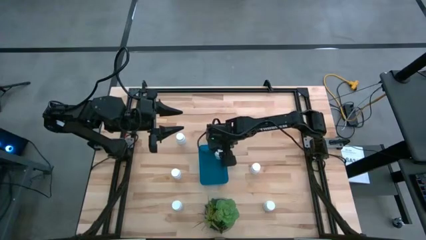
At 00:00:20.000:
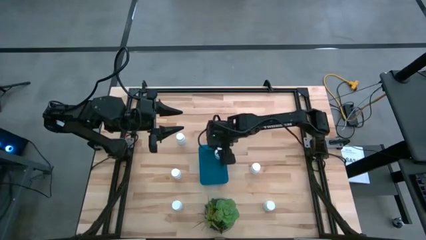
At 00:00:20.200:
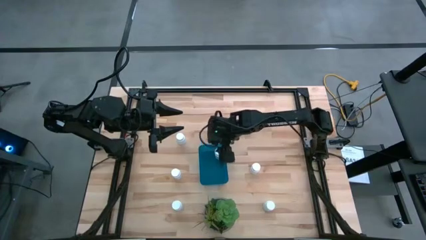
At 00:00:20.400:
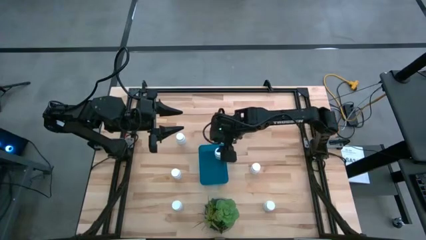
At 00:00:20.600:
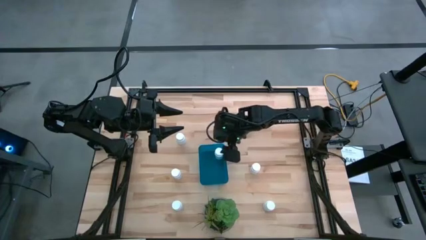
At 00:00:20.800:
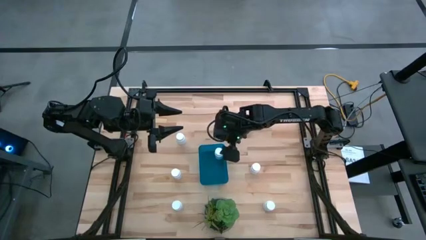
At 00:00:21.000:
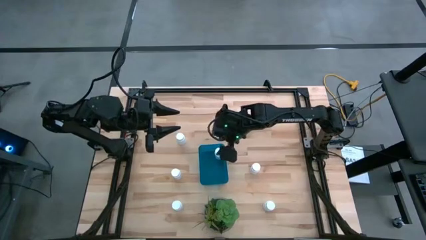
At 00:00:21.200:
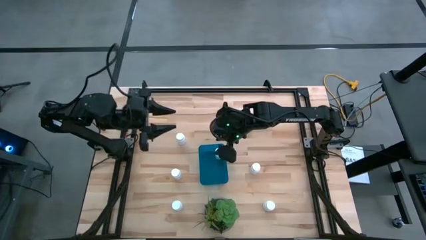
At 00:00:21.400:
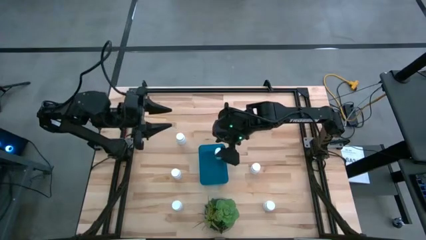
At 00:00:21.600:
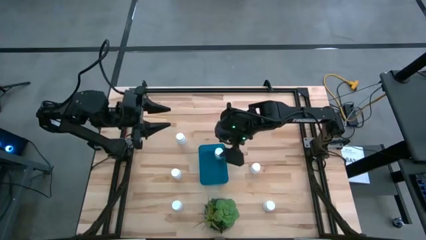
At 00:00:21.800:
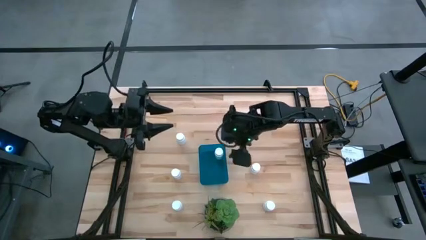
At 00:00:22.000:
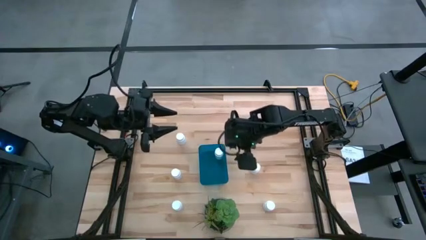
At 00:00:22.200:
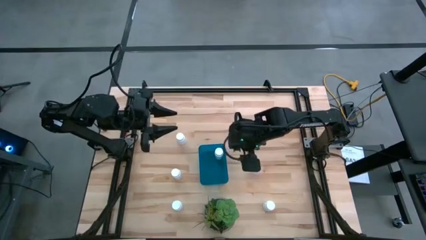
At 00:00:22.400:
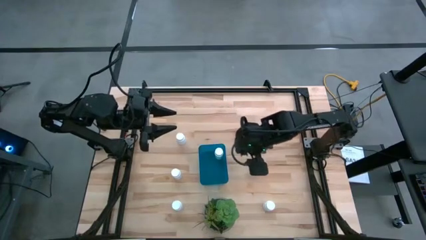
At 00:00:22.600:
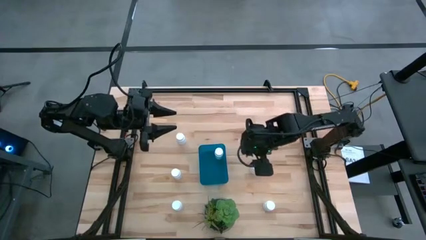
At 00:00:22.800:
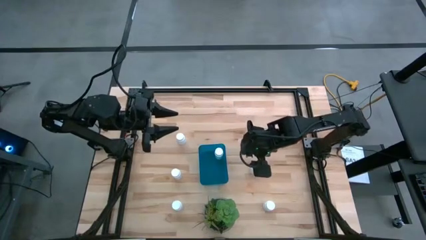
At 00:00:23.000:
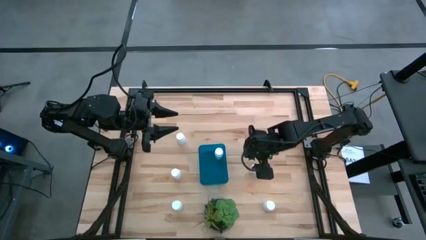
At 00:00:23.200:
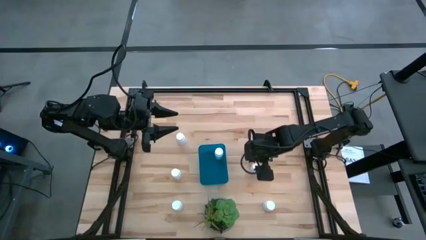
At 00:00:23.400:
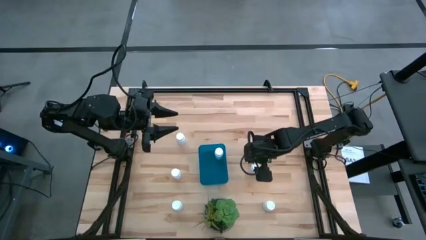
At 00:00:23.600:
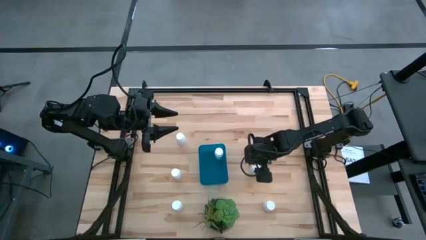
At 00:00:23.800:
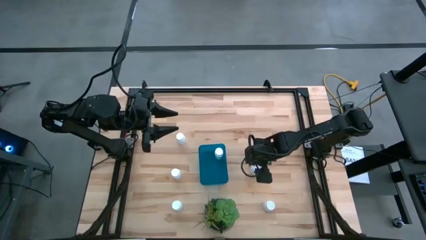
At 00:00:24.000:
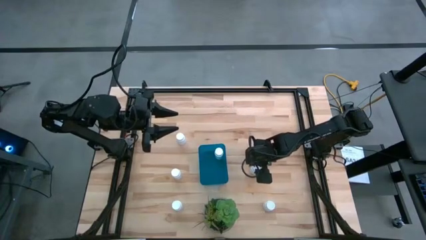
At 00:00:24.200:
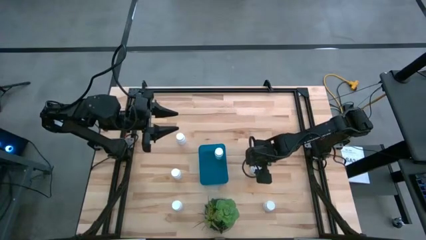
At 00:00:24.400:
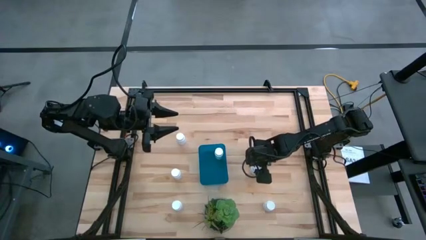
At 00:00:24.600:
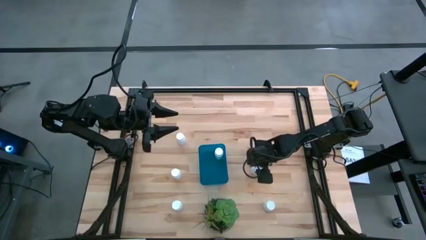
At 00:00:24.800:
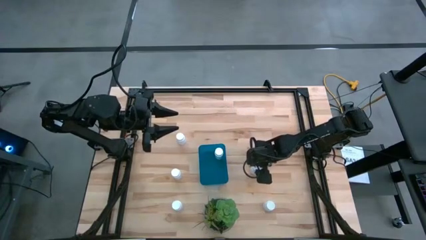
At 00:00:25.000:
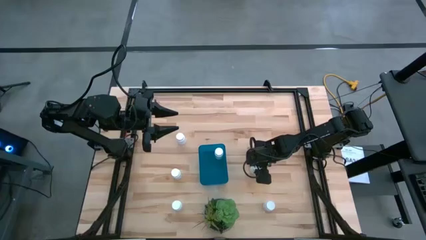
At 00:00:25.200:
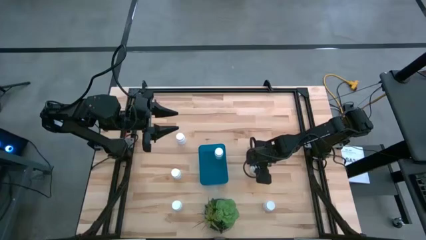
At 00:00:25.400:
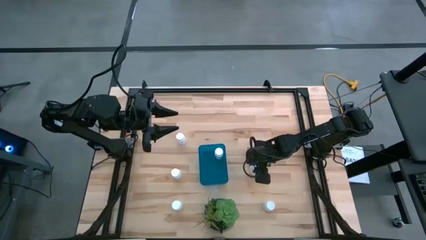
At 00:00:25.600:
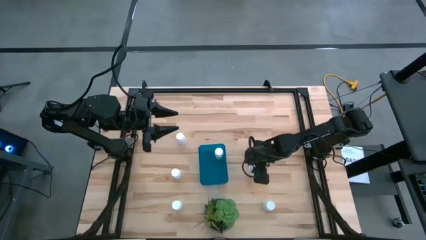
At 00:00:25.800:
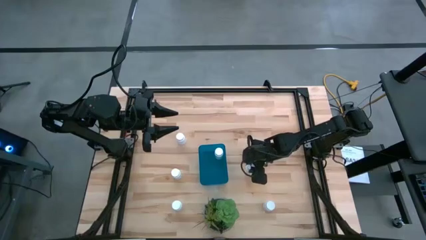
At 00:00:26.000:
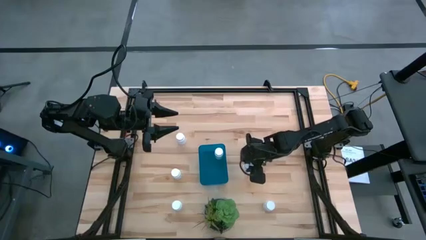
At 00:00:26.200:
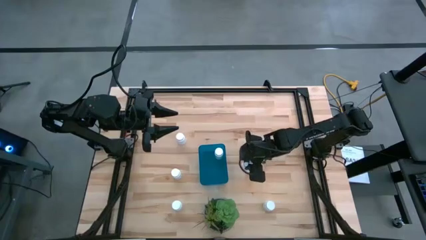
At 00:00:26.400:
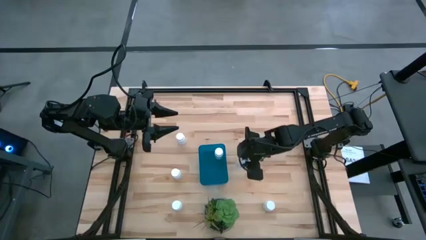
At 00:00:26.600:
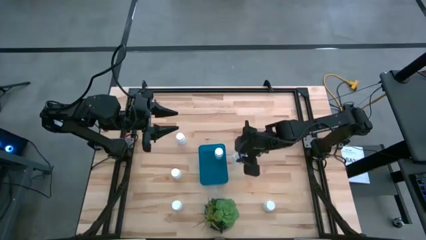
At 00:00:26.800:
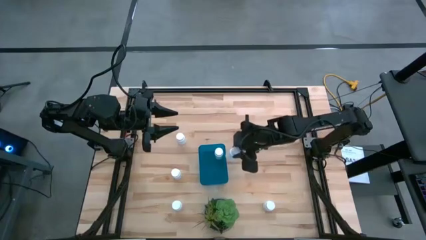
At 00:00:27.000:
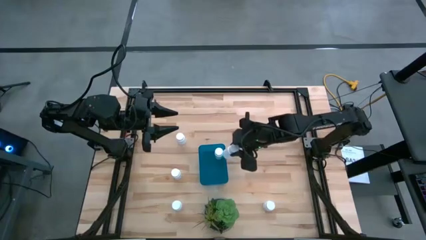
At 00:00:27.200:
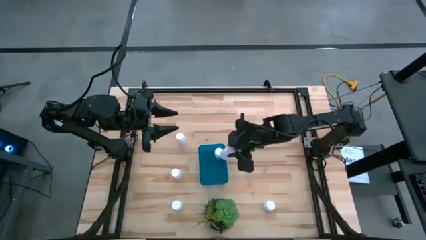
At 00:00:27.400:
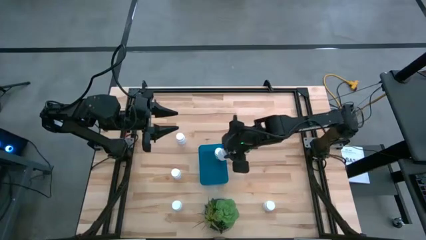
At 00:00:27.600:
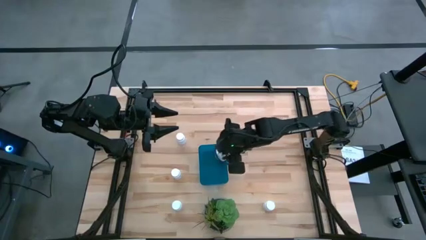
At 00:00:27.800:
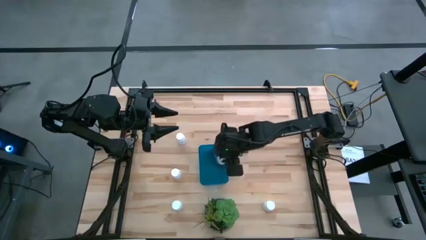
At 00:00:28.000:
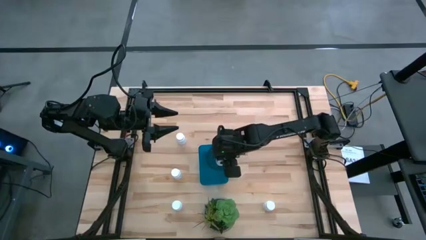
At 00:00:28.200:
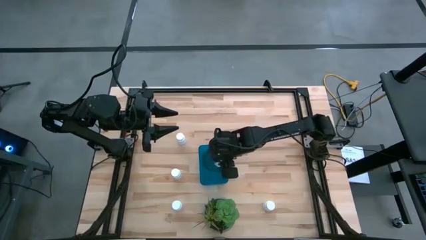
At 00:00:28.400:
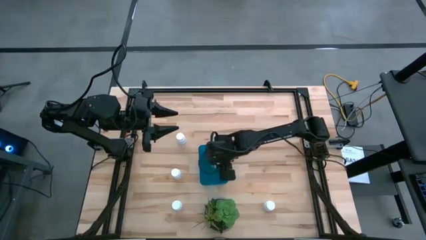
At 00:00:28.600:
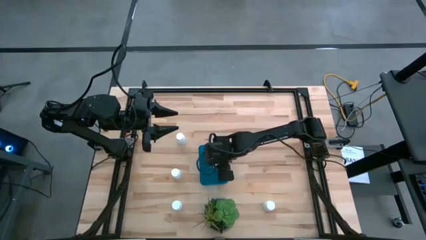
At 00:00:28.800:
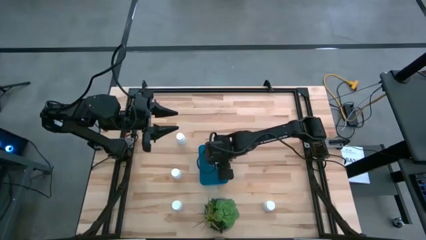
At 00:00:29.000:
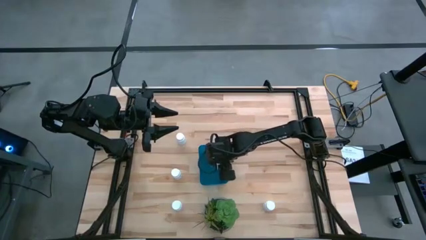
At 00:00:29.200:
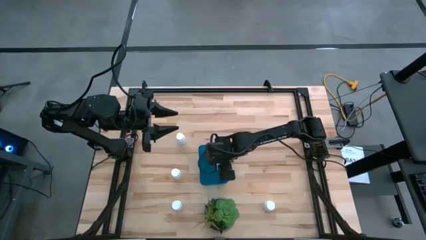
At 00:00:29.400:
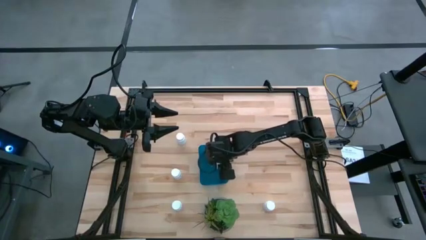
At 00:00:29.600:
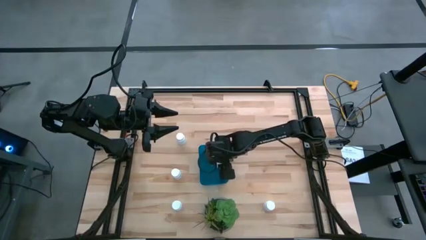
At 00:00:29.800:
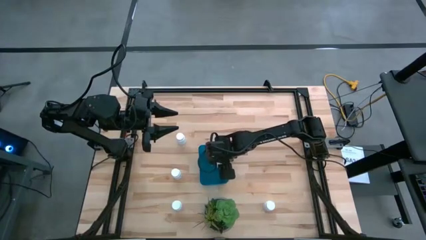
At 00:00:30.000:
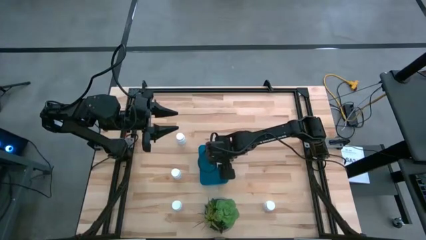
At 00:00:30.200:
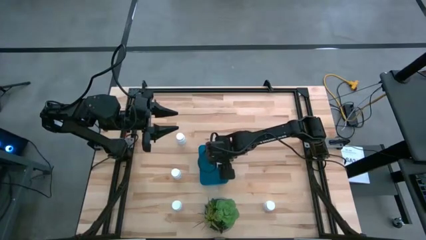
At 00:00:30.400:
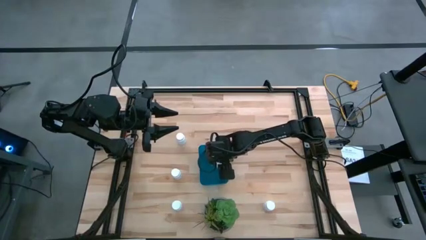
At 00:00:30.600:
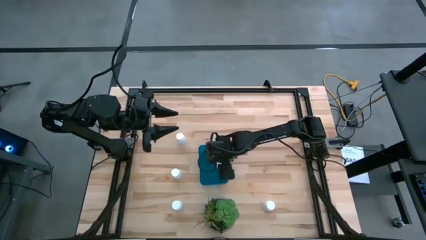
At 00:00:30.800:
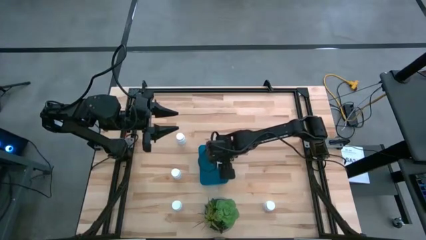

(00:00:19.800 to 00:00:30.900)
Task: Pick and place pill bottles into a basket
Put the medicine bottle into the container
